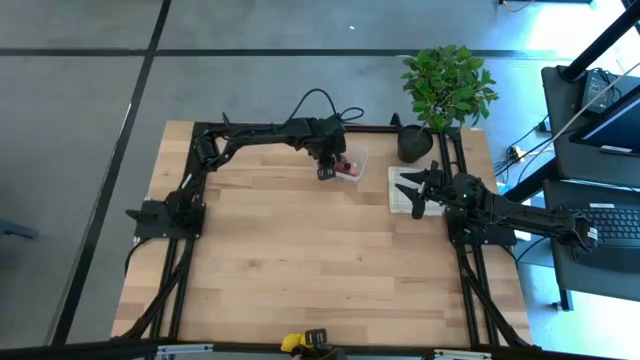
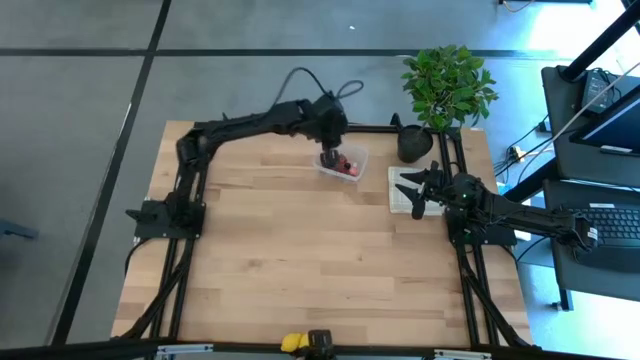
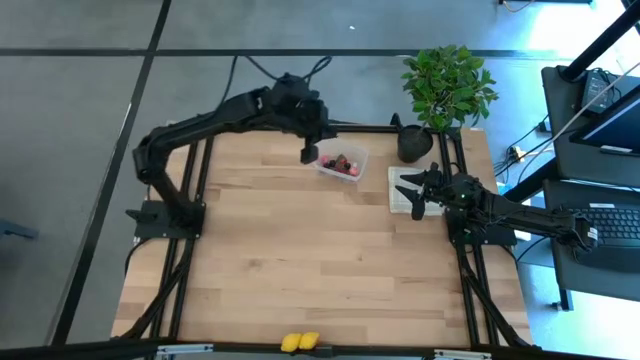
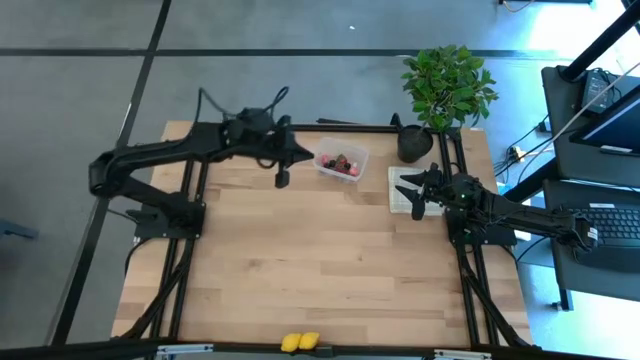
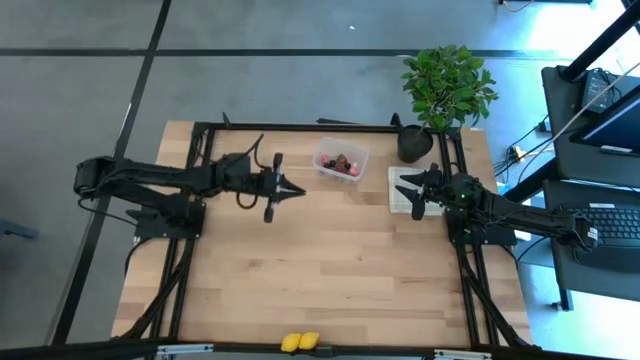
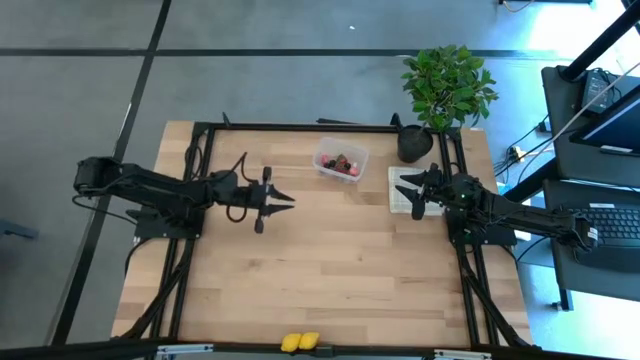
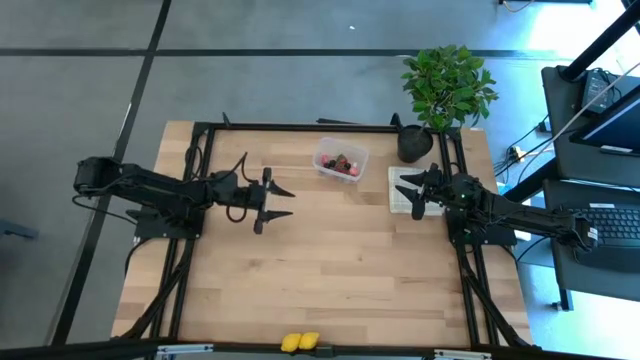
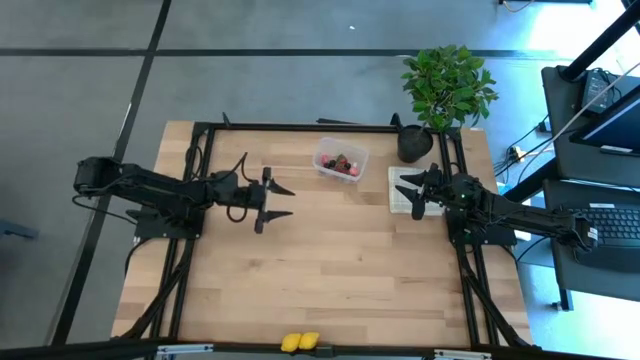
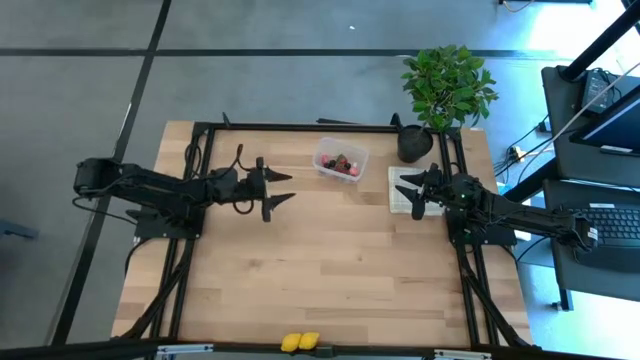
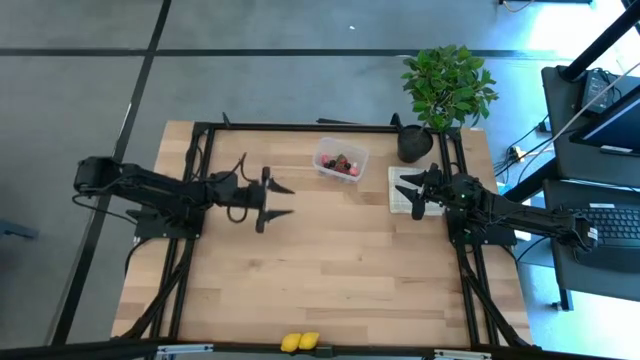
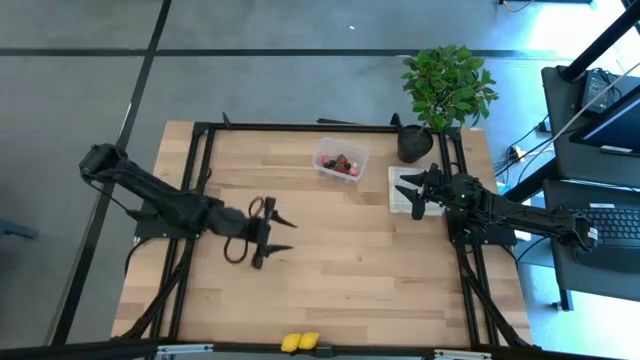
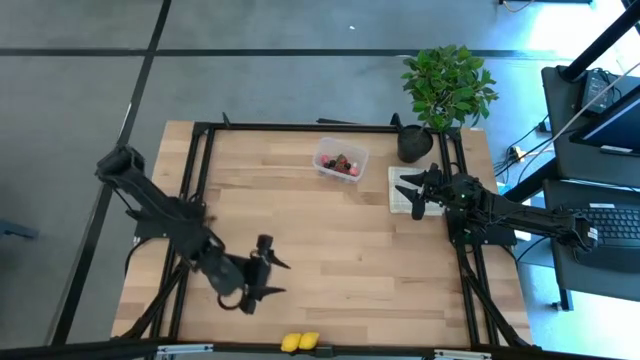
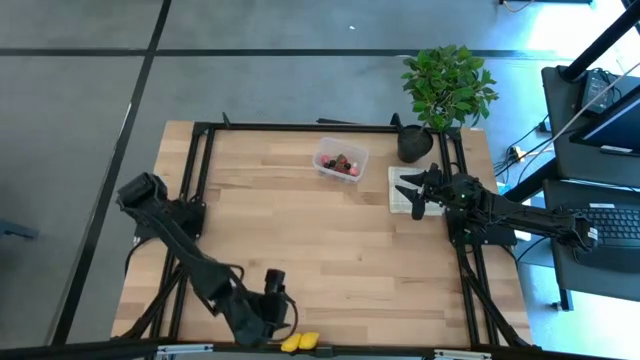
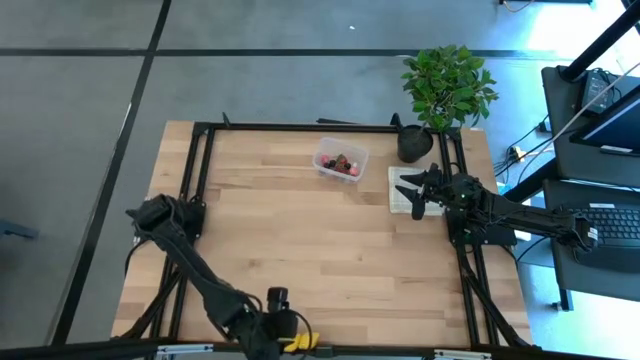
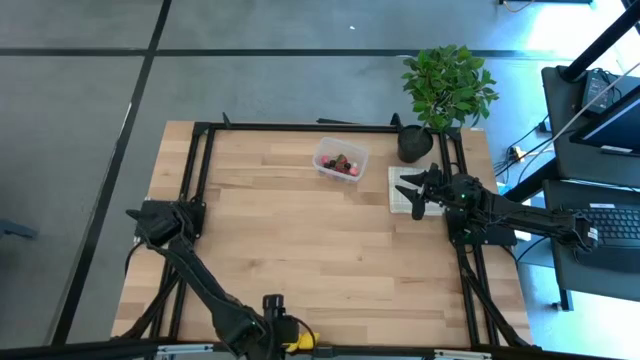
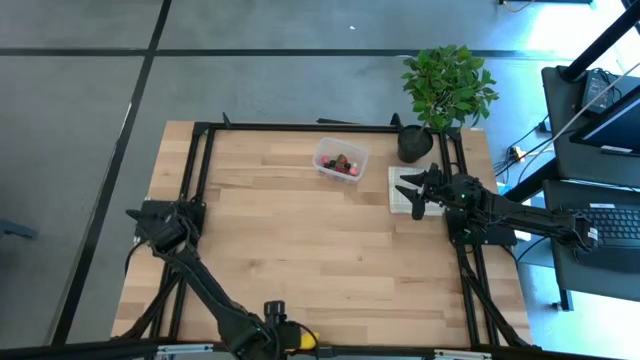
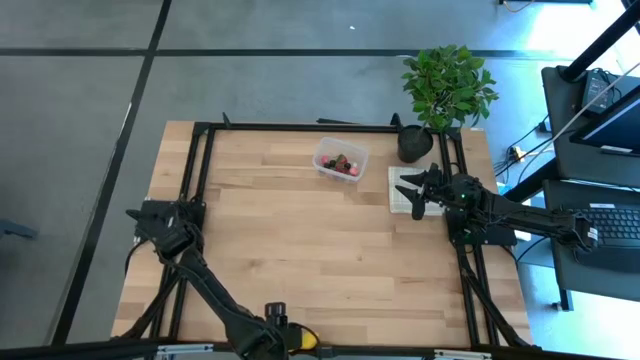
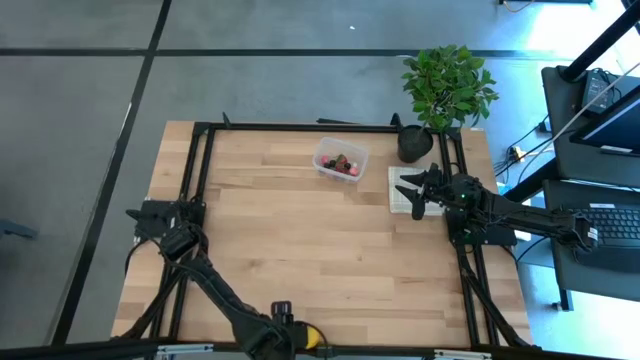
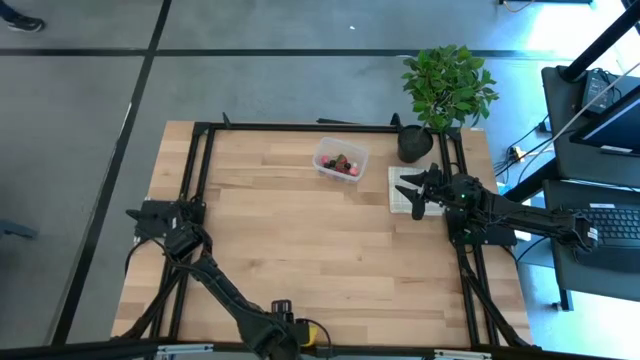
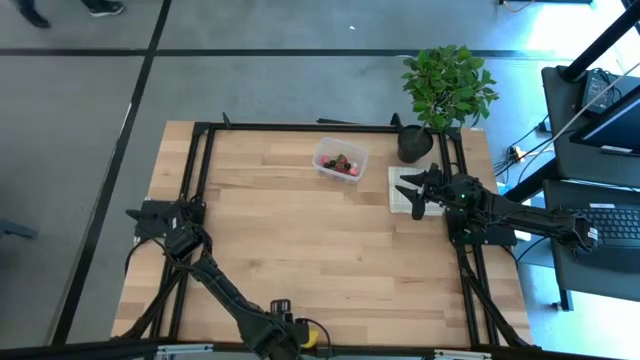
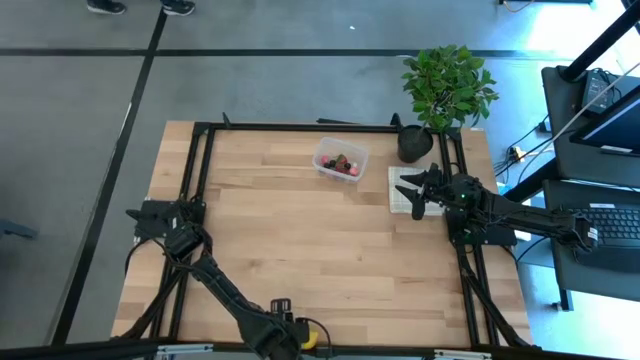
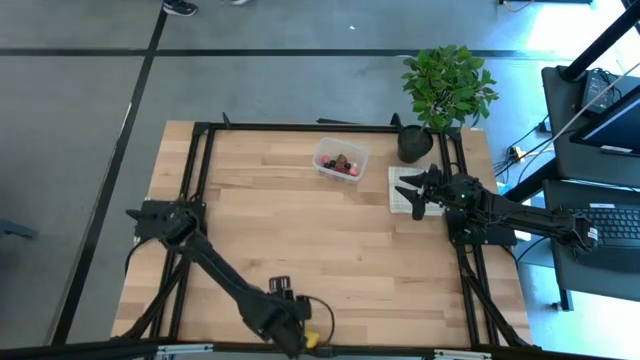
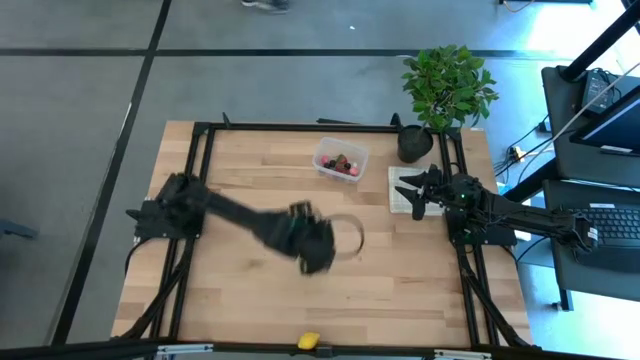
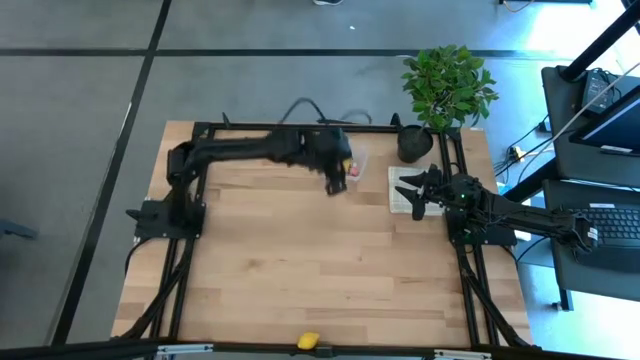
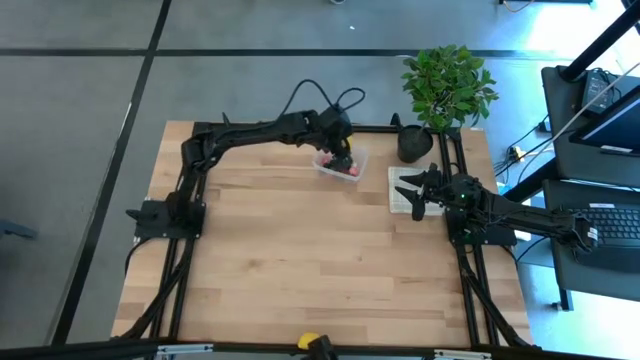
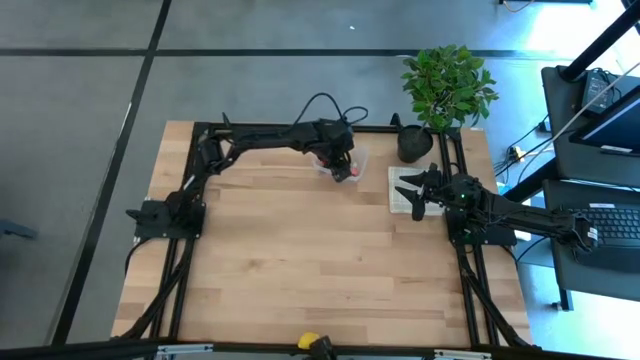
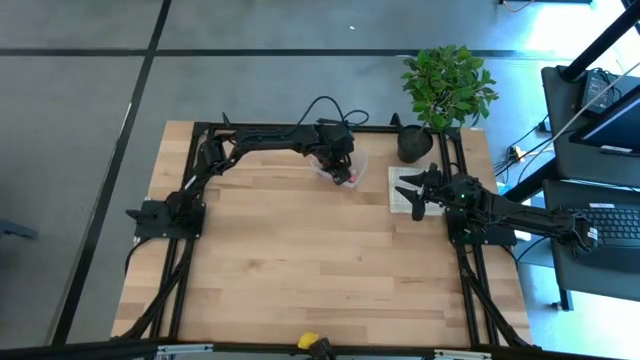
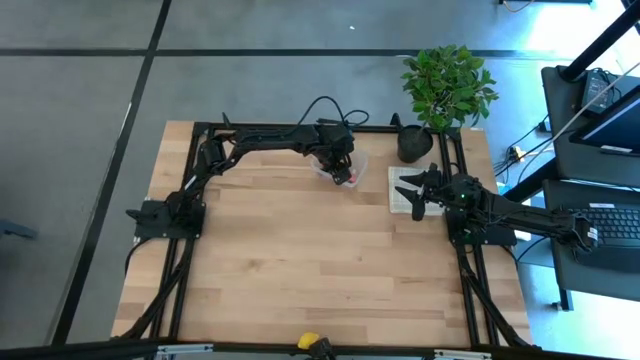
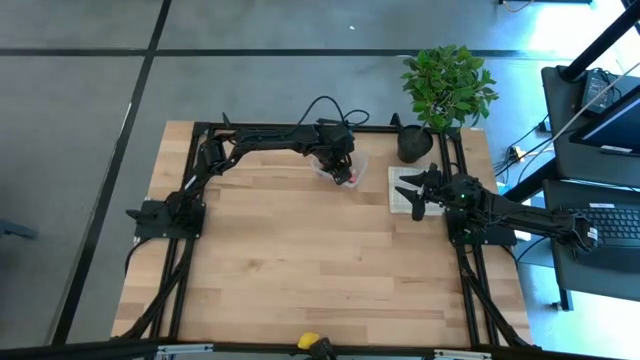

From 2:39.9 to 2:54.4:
Task: Pick and placing Produce into tupperware
Put the left lemon into the transparent container

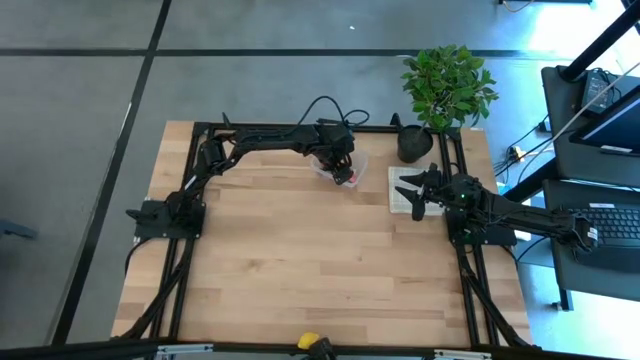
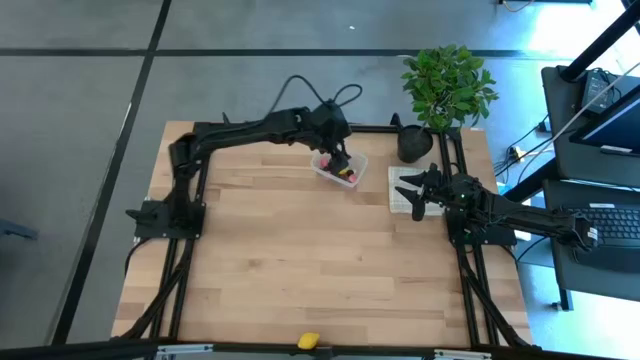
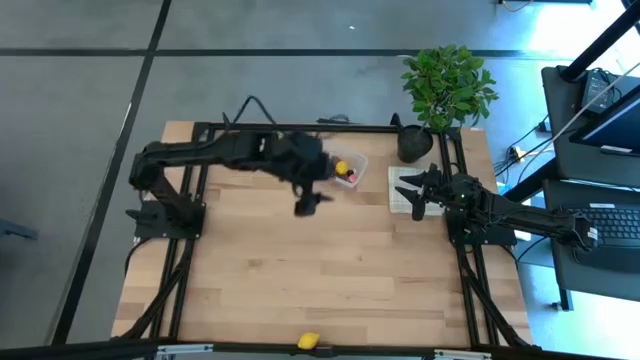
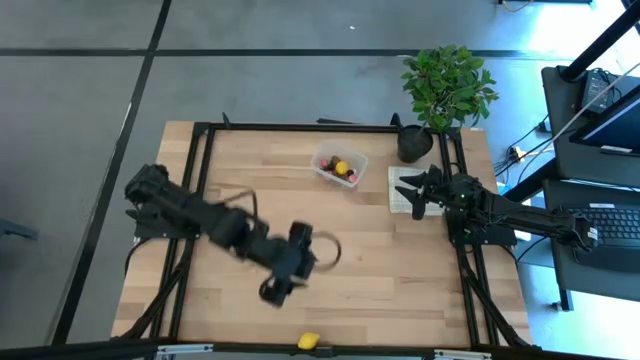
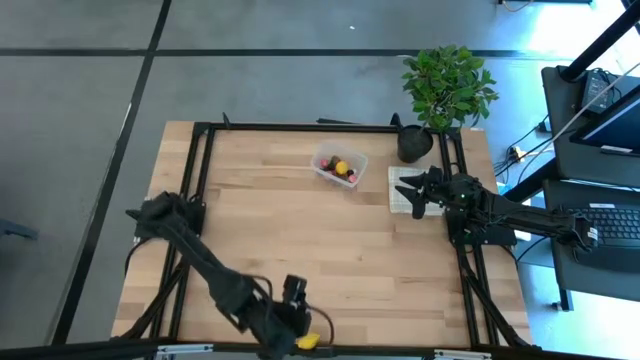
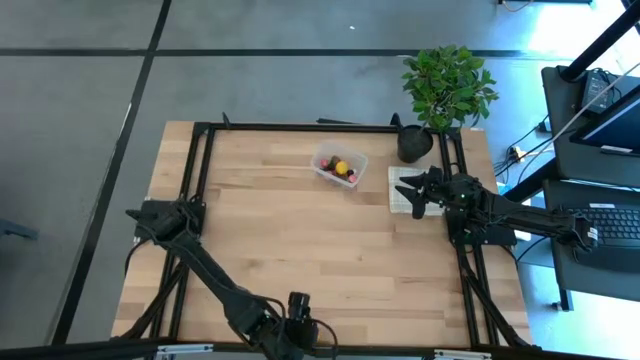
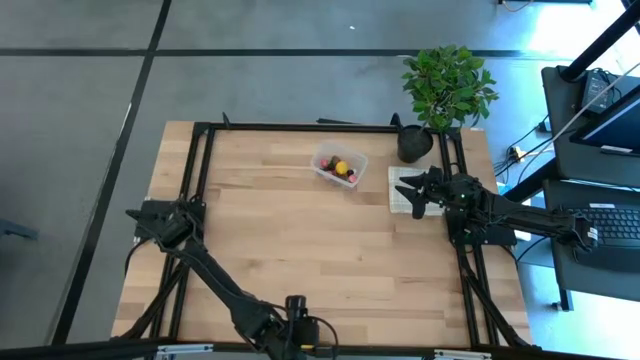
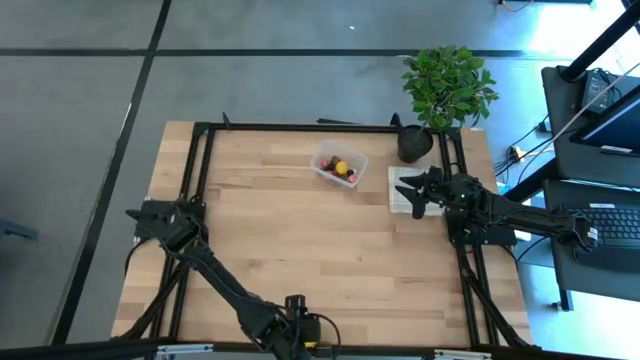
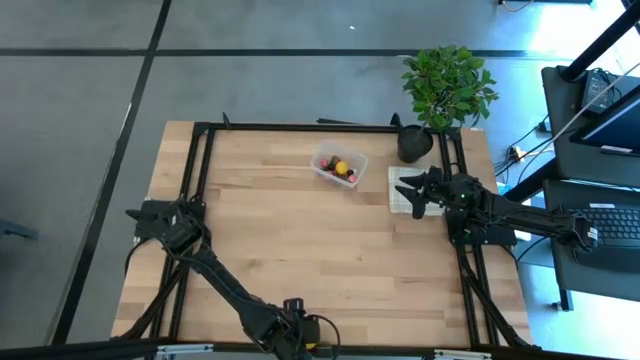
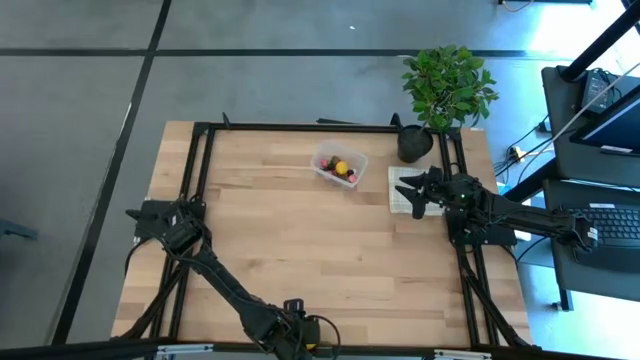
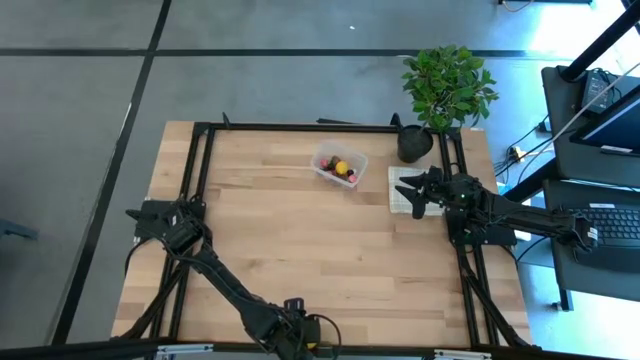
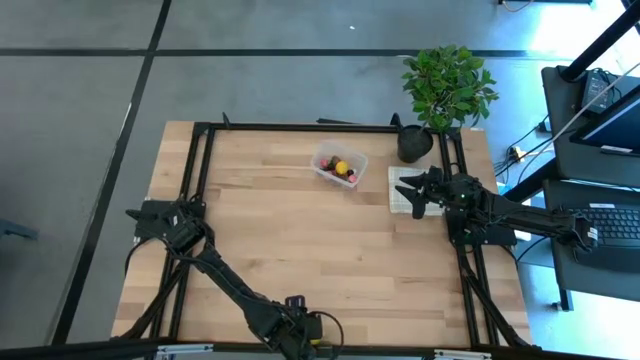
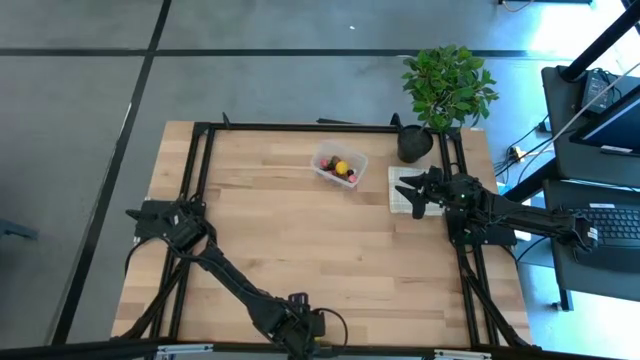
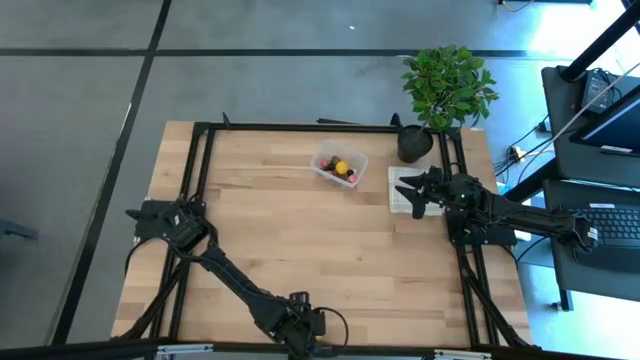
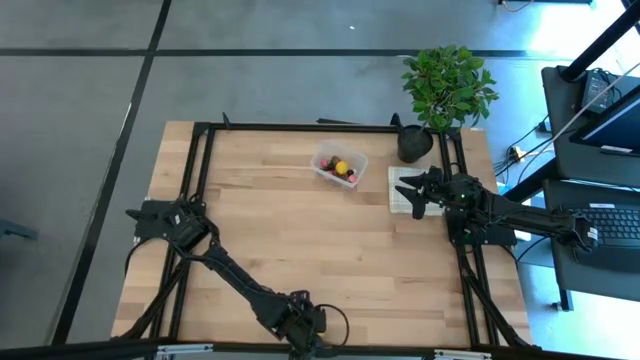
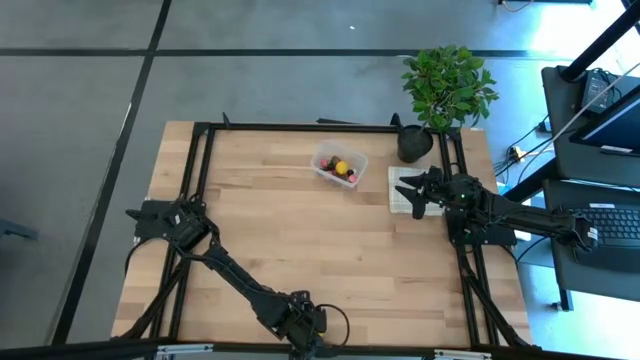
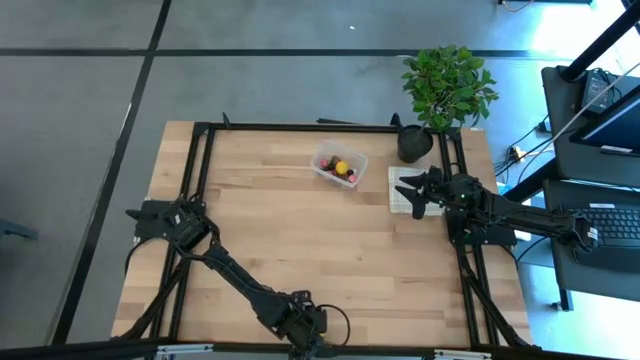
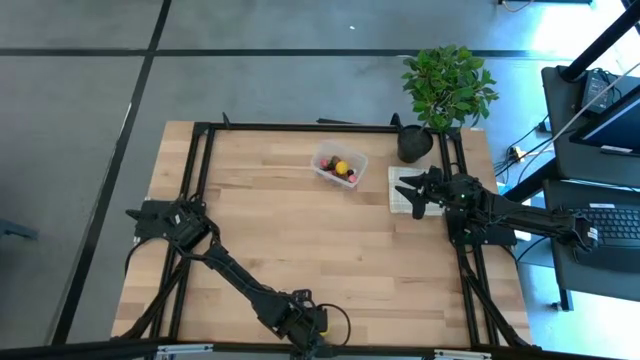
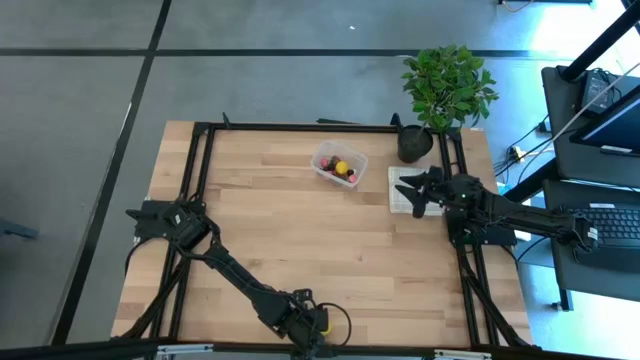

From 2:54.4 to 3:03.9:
Put the lemon into the transparent container
